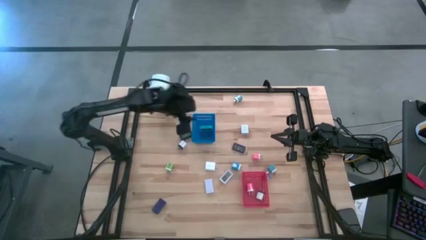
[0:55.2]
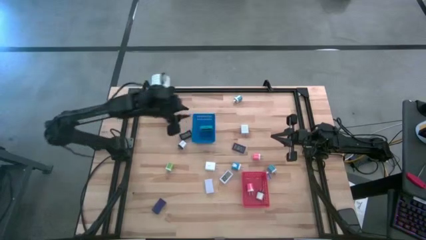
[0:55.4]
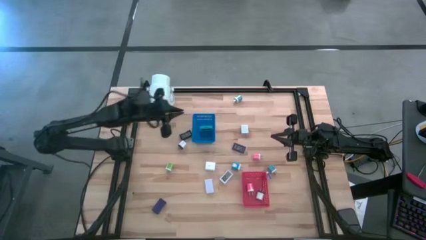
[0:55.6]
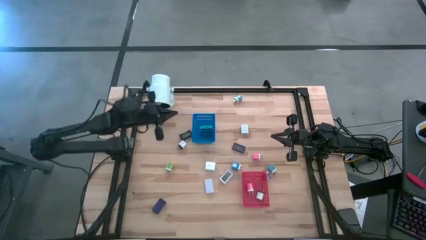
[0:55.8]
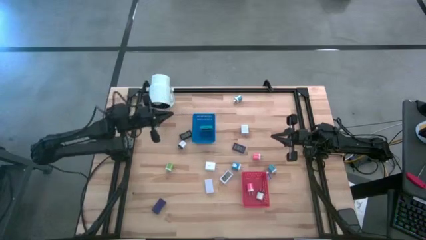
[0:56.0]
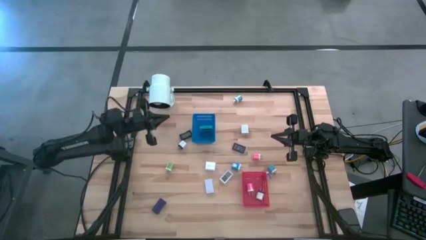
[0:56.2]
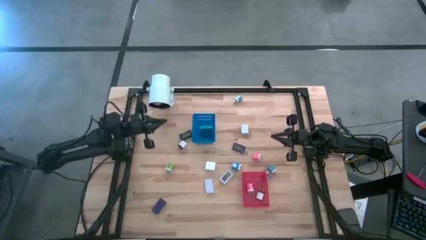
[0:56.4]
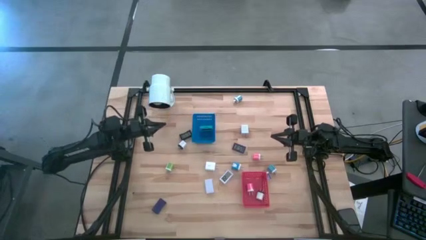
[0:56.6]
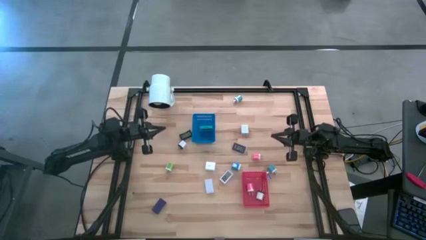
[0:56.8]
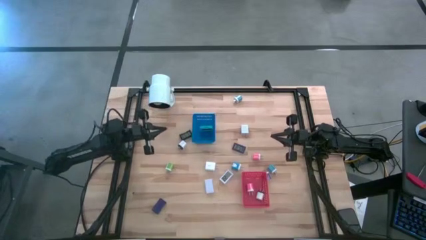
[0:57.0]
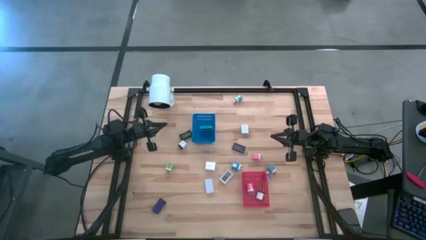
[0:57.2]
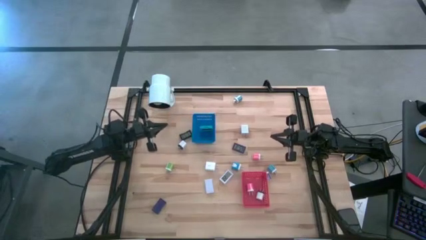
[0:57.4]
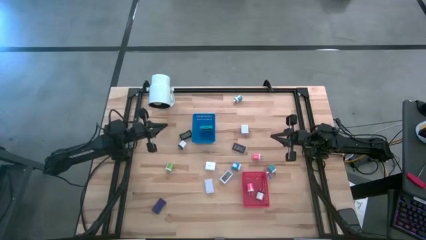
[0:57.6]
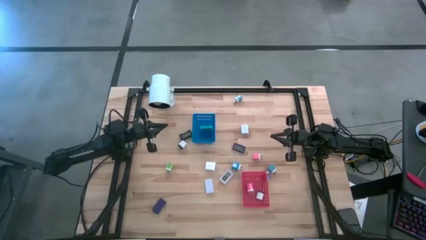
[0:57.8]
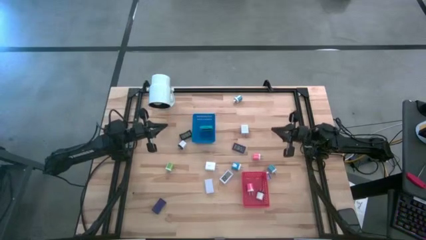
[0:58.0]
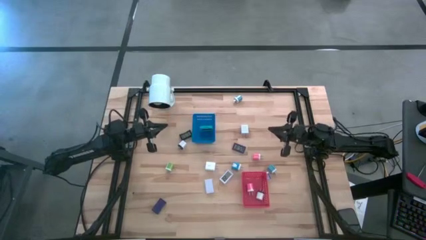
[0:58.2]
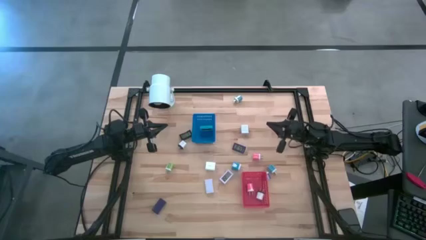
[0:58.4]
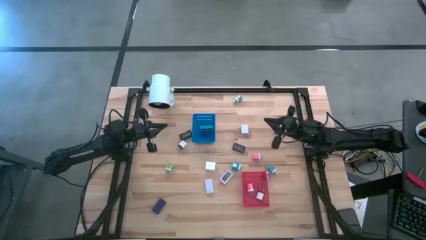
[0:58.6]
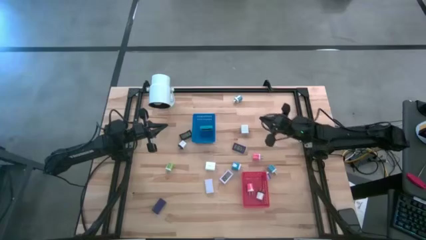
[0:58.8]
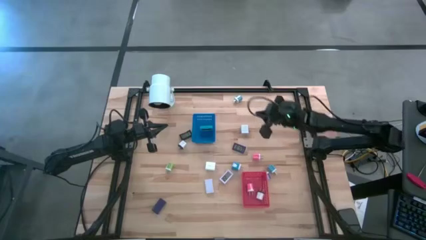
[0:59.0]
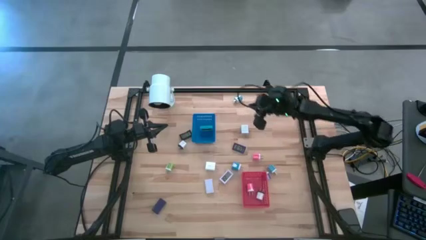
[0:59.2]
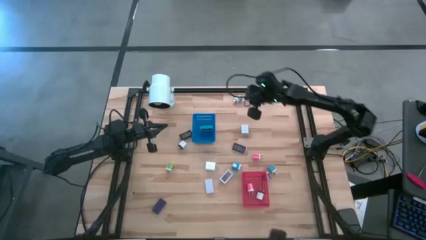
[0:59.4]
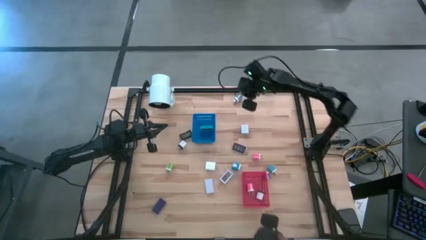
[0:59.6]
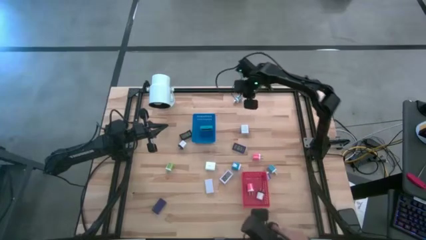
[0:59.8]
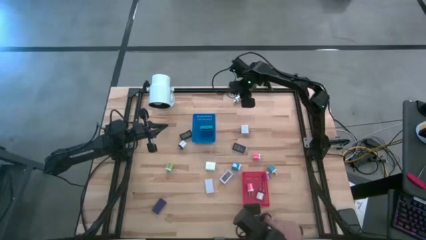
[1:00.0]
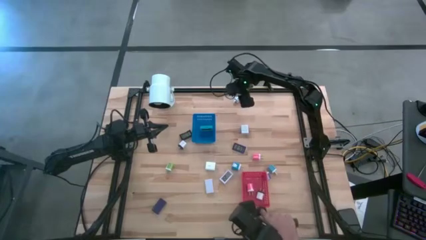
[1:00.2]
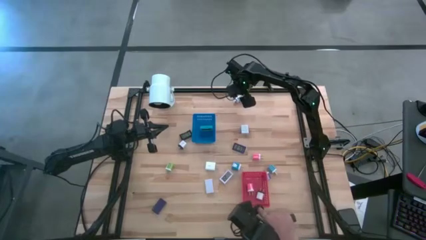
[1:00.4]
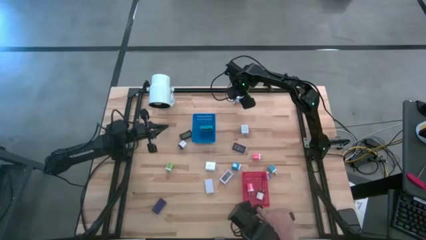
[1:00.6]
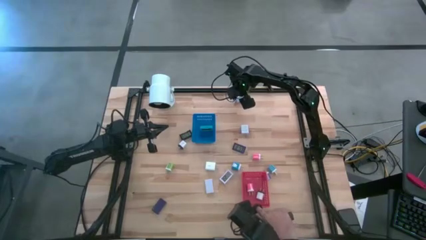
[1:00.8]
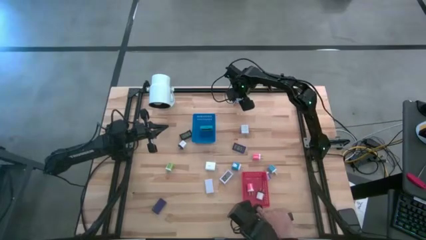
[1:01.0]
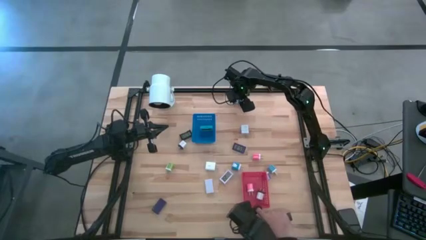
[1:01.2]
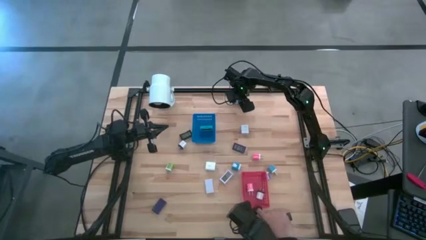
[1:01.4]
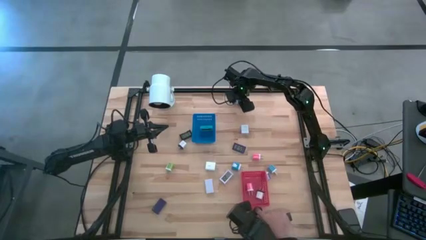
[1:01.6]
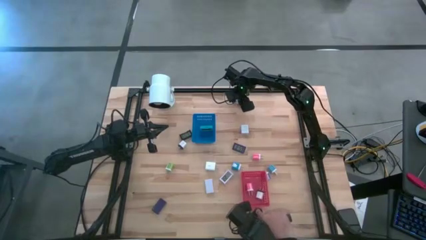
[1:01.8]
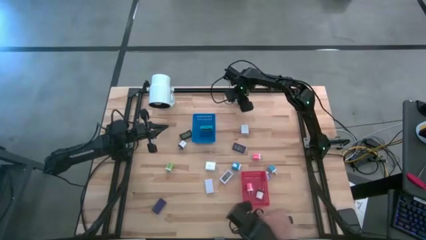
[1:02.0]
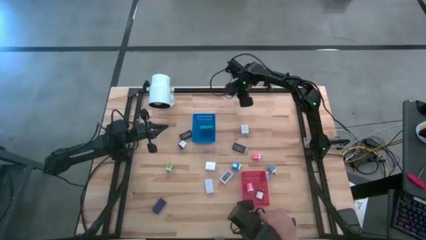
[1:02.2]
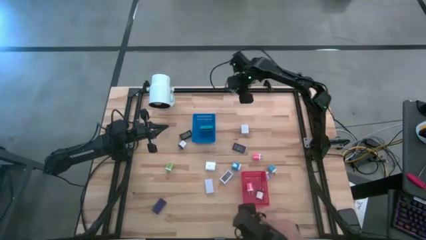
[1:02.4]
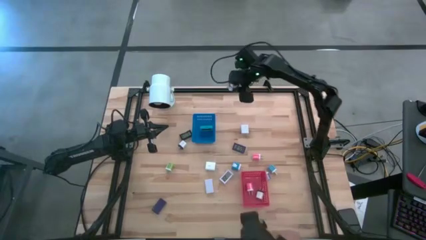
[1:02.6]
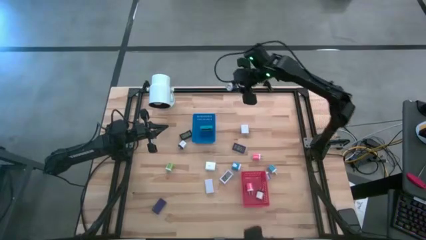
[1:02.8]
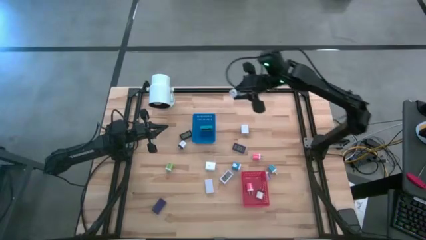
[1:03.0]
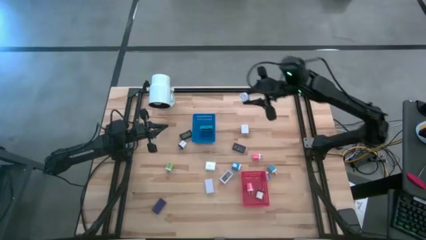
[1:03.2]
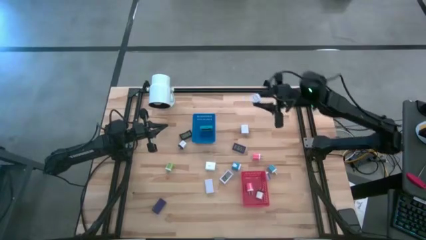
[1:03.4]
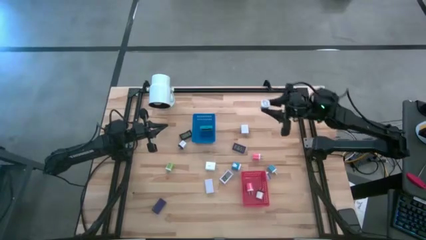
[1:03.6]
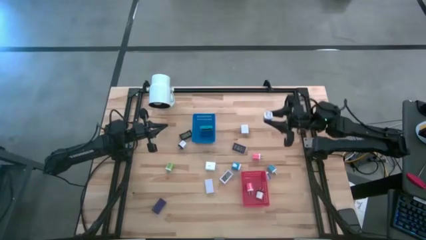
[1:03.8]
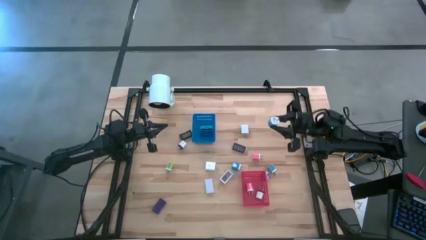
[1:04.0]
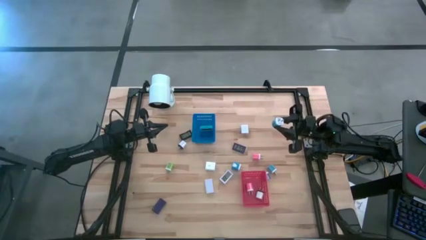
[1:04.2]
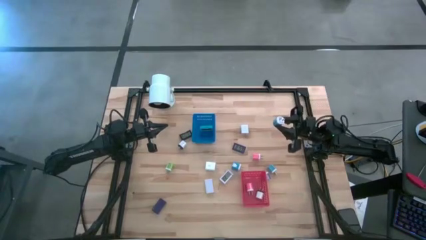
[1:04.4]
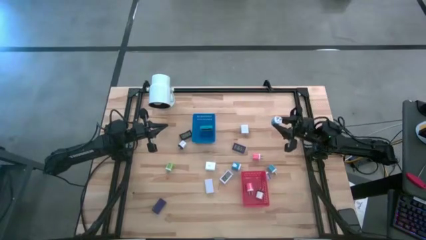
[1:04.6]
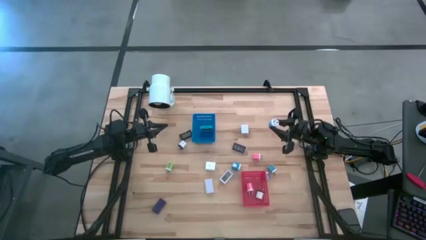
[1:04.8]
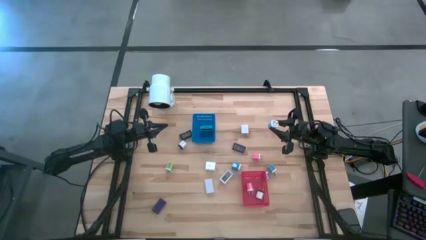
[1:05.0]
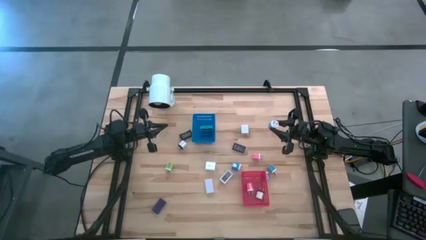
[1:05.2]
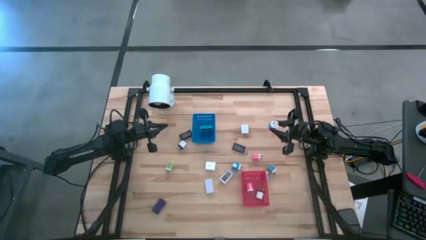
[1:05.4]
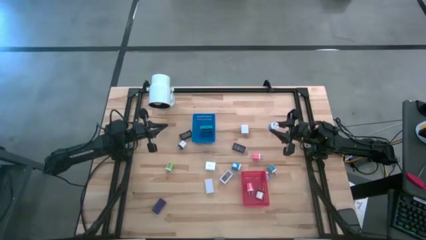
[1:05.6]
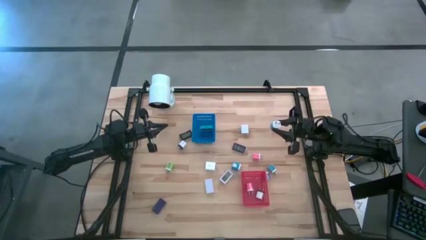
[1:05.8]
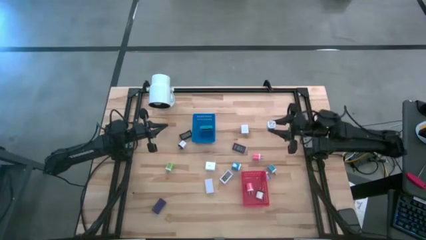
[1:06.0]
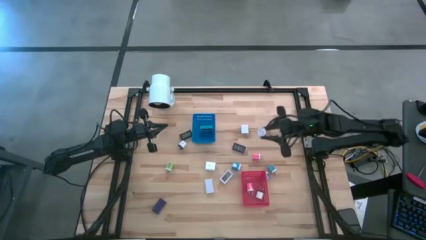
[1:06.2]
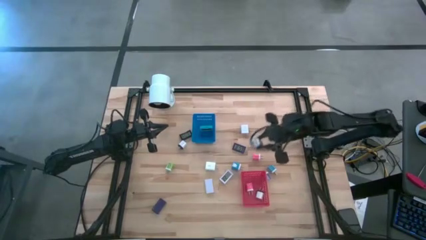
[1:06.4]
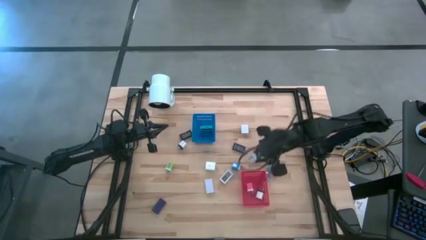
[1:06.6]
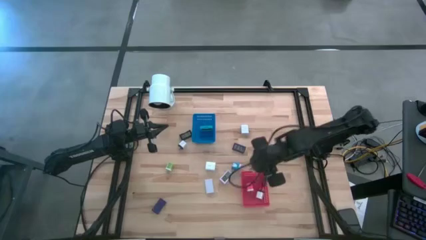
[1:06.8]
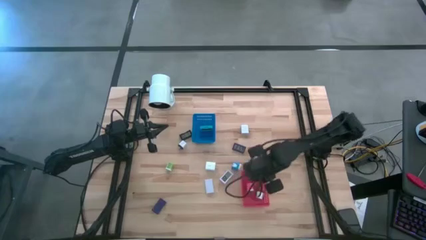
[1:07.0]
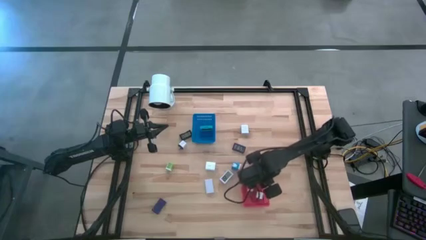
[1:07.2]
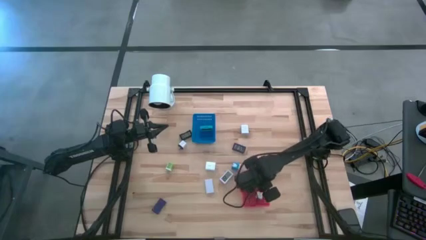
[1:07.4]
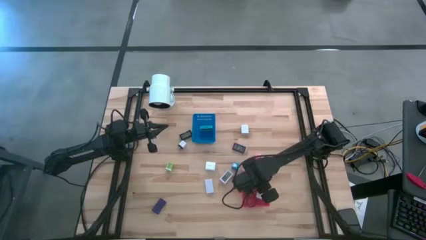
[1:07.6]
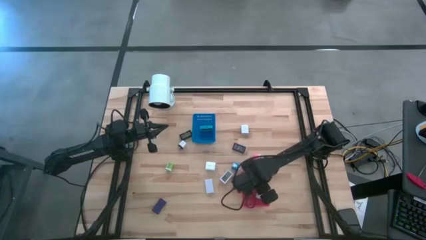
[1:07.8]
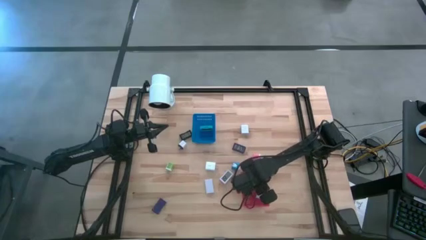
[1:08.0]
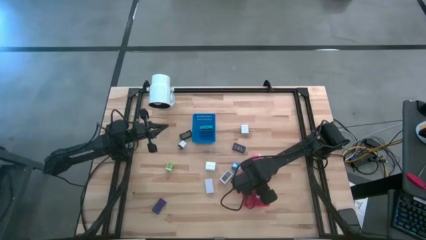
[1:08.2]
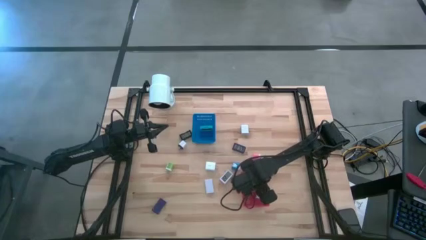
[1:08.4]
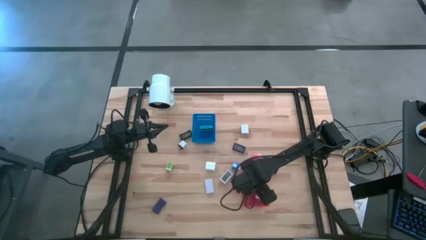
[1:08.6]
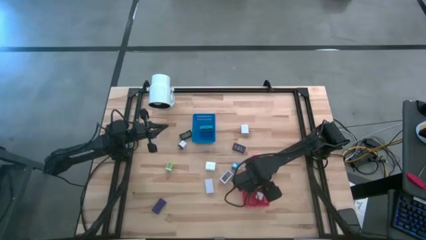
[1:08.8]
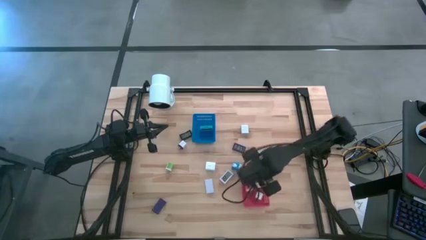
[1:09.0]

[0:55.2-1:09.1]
Task: Pick & Place Office items
Put the top blue charger adapter into the red bin

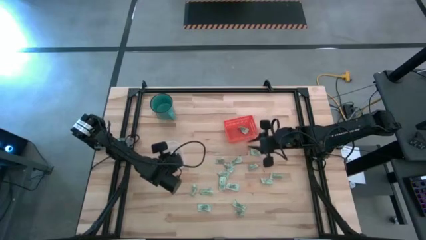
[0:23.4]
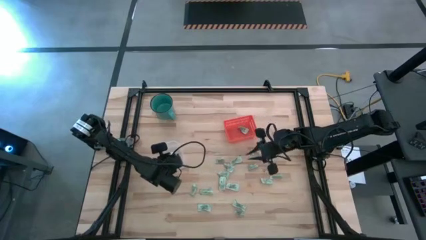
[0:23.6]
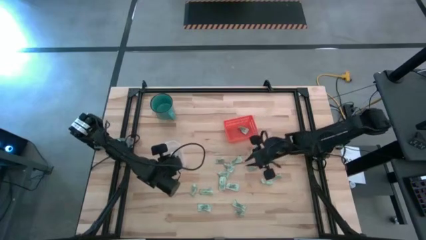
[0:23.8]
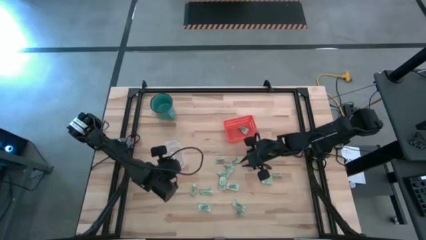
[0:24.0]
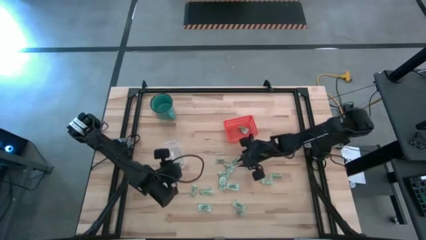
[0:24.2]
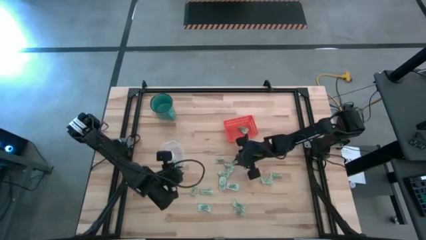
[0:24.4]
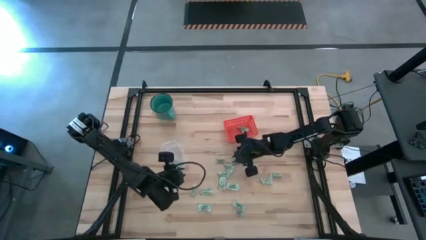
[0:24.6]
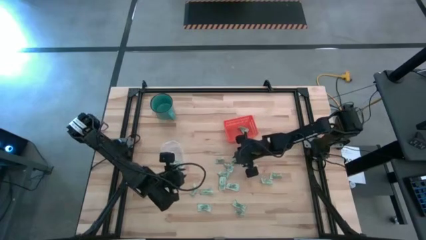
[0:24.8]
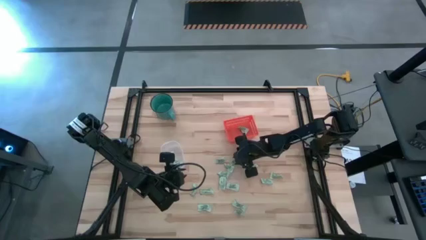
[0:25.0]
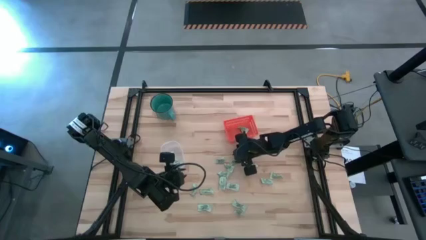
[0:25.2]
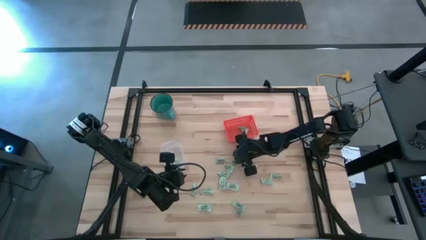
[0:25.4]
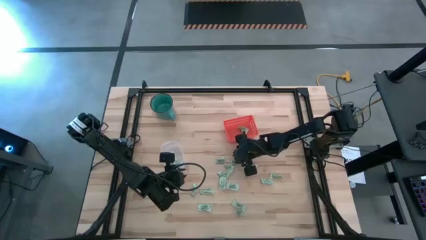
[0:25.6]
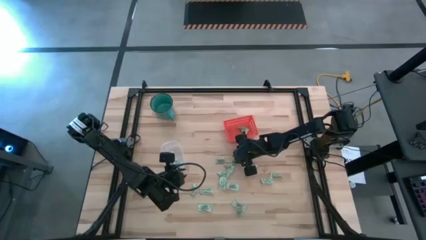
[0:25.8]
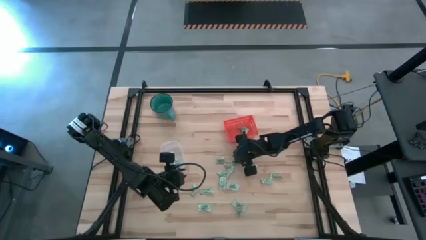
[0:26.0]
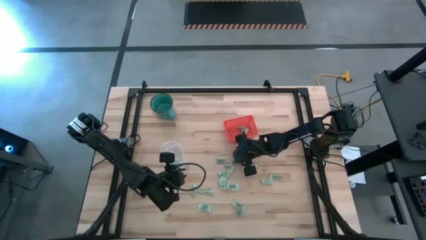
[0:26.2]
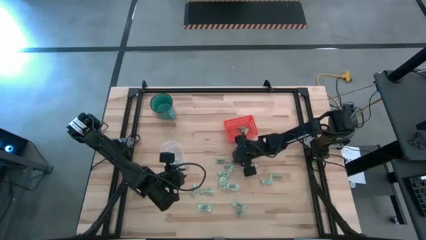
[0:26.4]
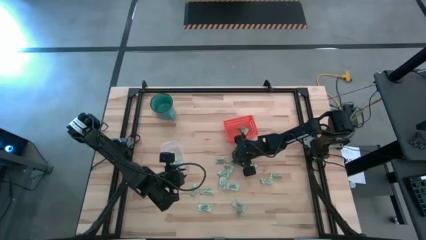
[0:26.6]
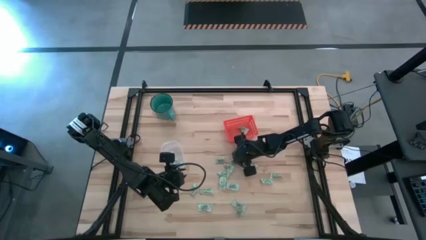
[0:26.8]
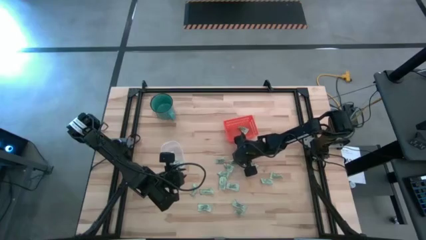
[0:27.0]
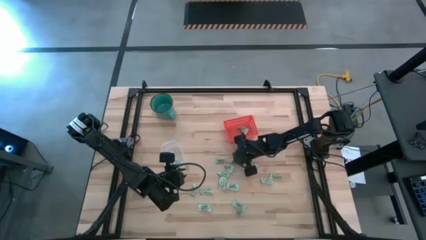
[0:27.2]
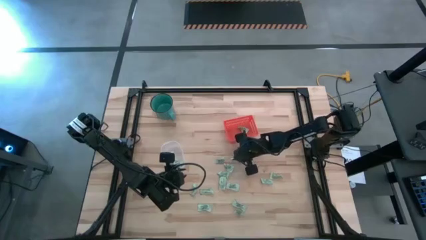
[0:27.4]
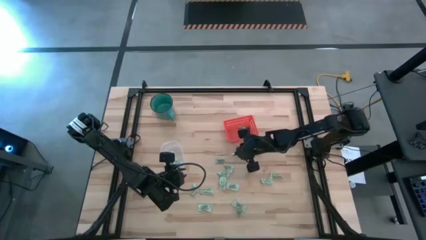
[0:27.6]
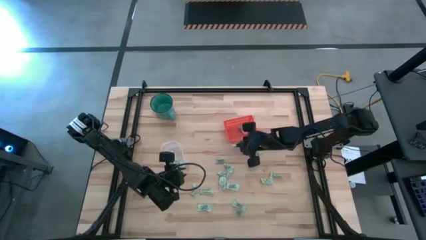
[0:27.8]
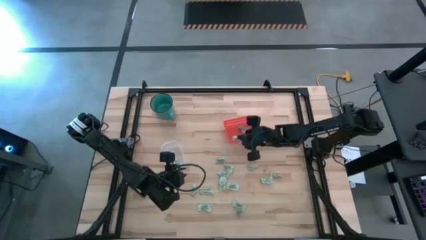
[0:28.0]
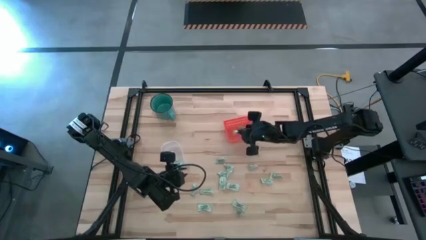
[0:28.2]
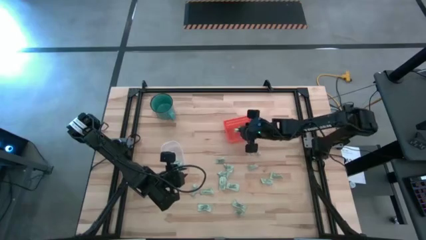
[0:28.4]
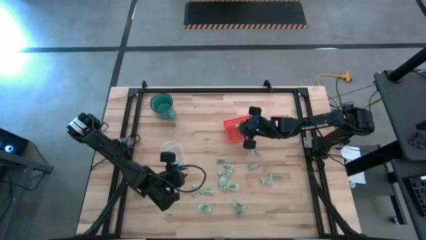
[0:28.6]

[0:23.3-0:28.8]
Task: Pick and place items into bin
Put the light green stevia packet into the orange bin
